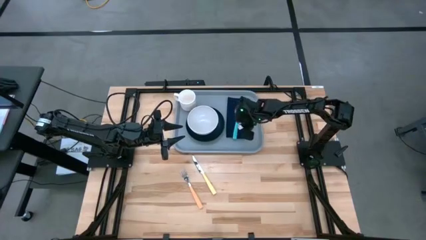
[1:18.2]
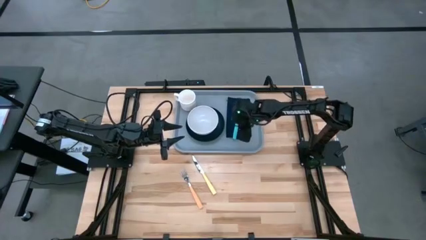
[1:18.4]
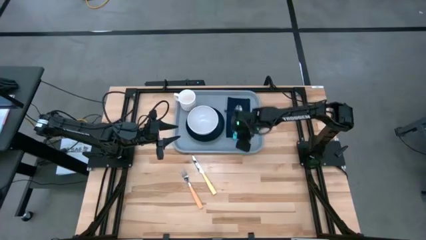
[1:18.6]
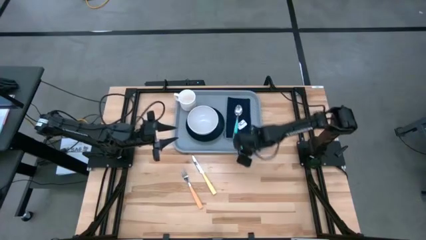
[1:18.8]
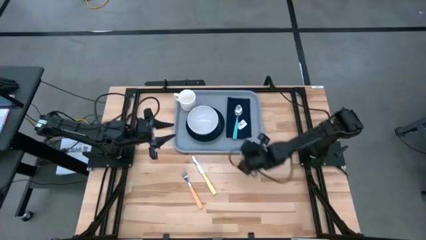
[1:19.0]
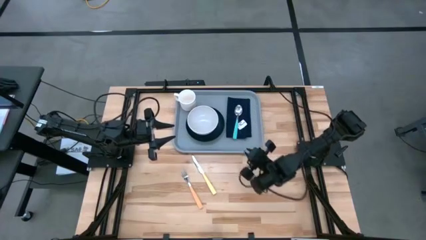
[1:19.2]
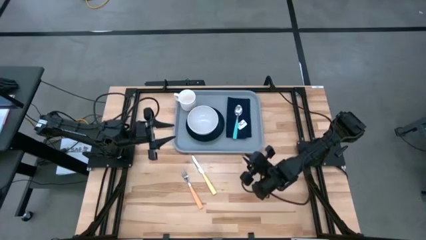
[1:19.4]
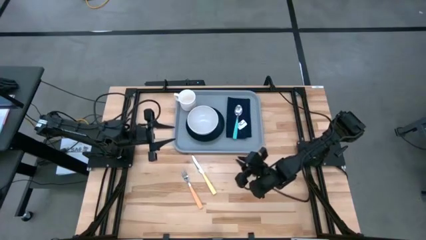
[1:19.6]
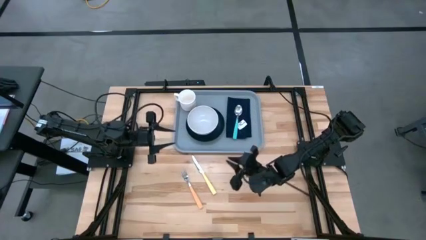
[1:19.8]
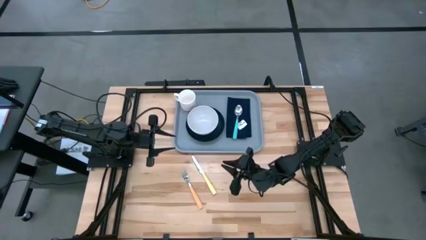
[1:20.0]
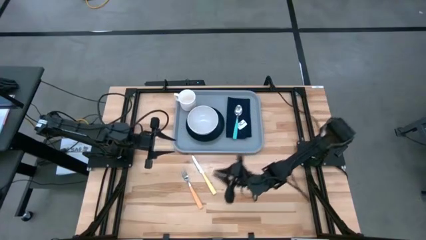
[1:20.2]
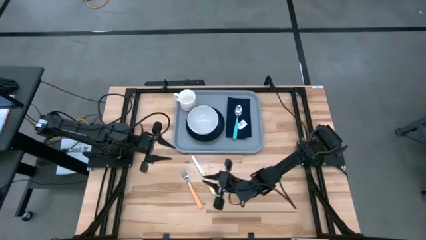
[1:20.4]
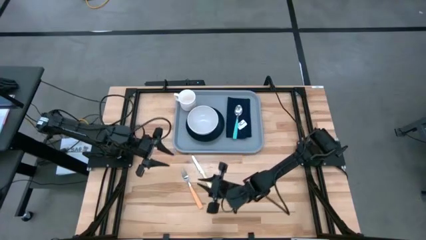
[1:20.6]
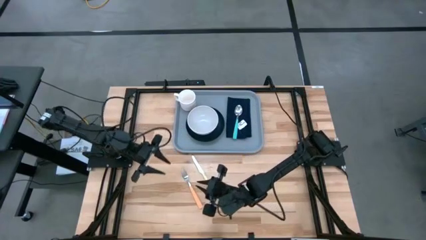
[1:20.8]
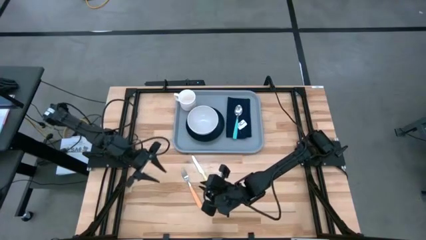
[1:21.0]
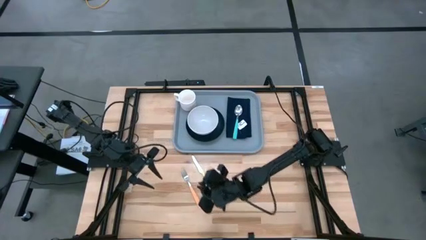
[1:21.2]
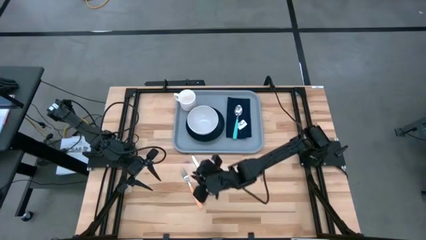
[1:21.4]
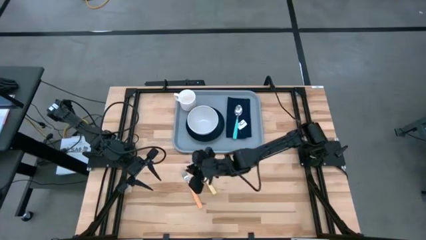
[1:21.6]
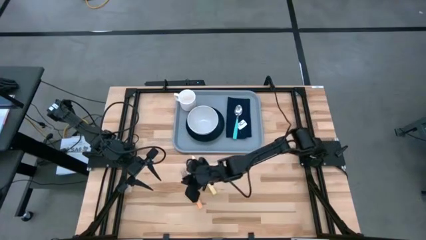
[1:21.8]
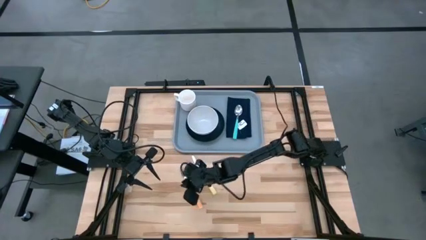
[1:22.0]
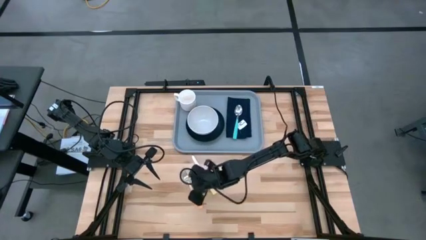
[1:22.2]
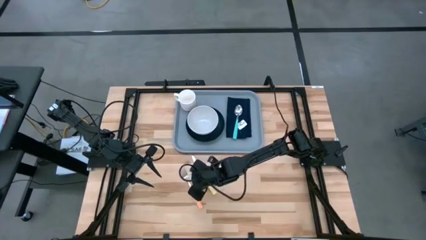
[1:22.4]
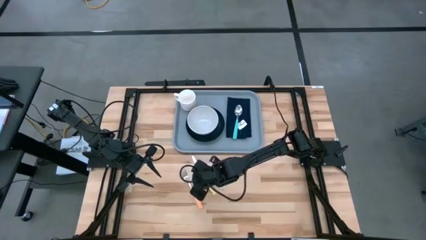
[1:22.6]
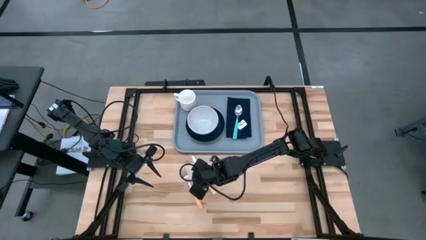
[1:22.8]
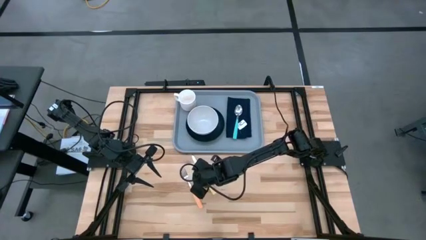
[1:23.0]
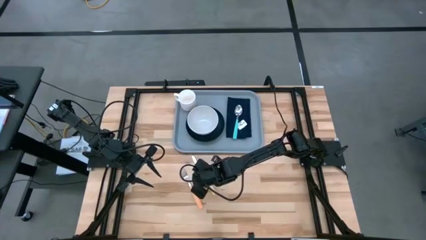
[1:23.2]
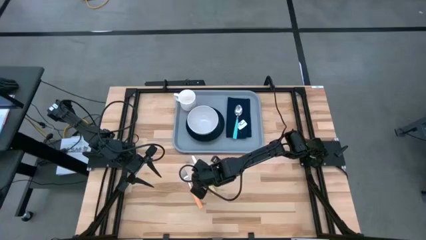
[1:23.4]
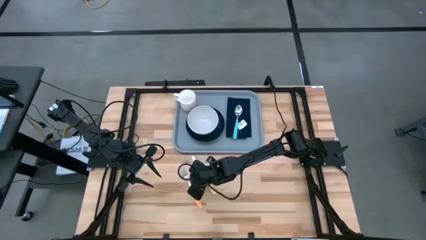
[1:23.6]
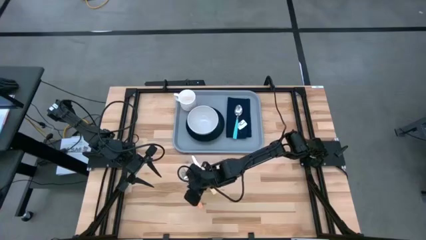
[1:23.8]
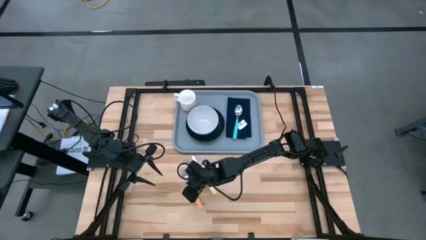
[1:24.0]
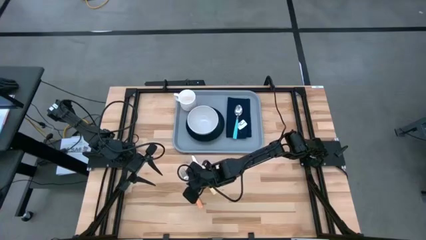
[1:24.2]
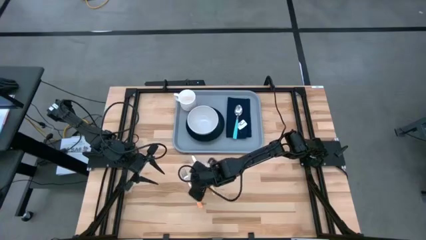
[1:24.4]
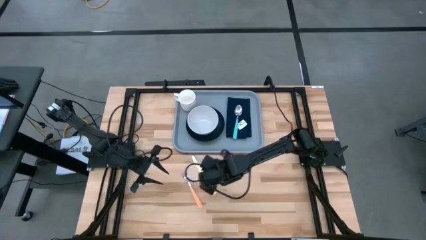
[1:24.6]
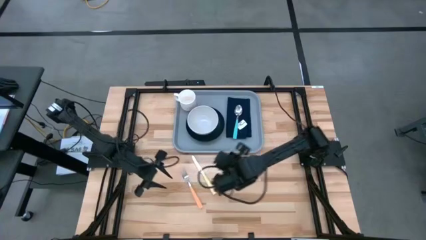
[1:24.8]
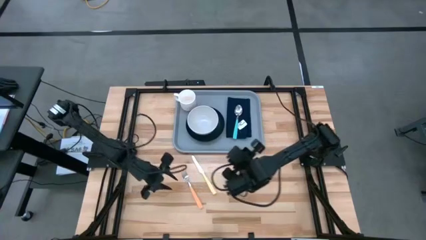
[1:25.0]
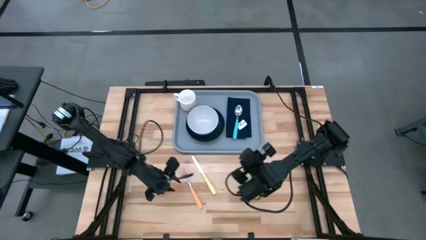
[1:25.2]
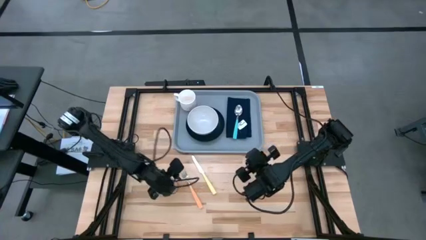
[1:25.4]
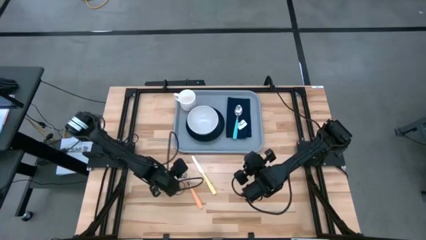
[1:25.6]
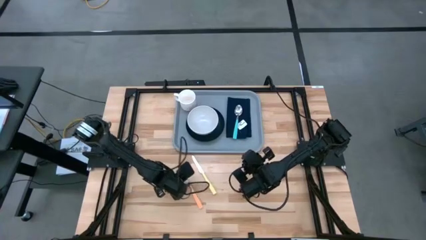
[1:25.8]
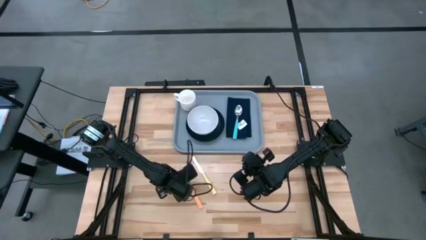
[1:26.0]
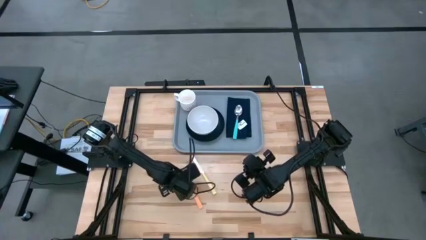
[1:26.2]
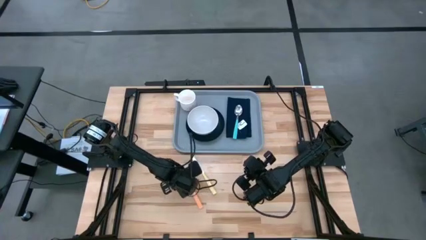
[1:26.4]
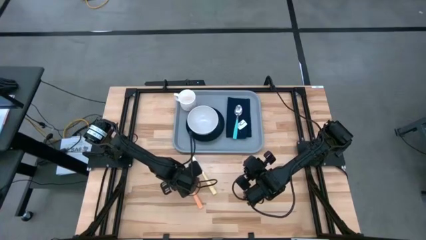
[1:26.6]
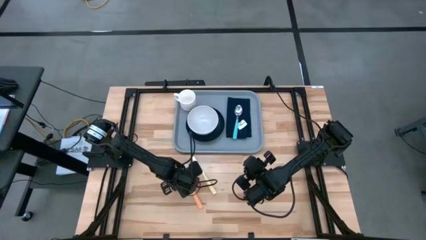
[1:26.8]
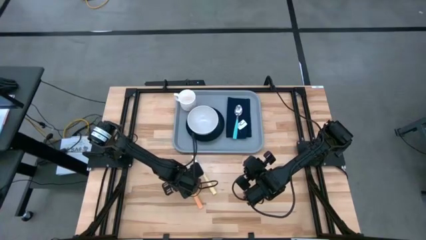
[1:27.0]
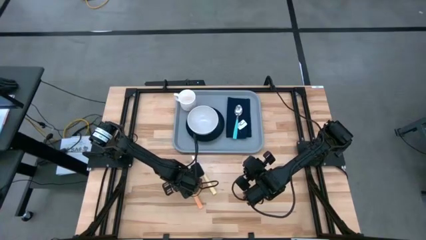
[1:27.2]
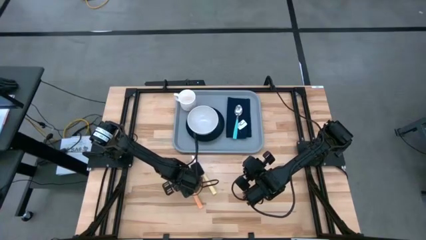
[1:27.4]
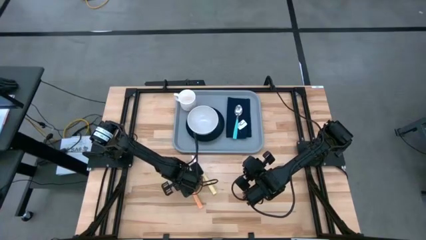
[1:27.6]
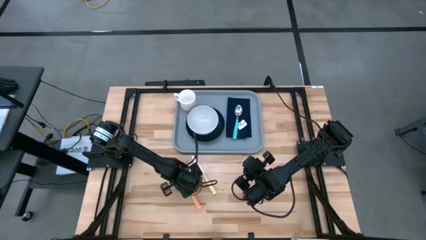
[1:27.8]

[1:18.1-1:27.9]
Task: Set up tray
Put the orange fork to the left of the blue spoon on the black napkin

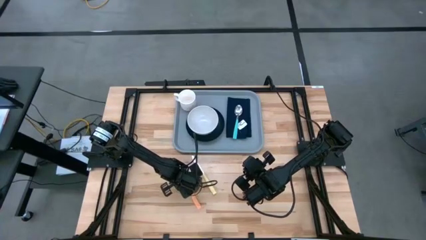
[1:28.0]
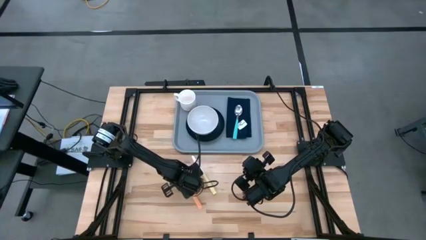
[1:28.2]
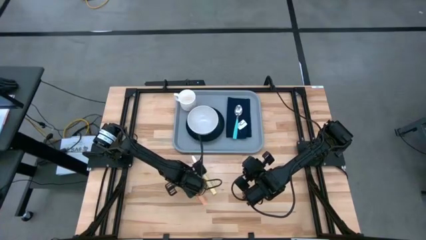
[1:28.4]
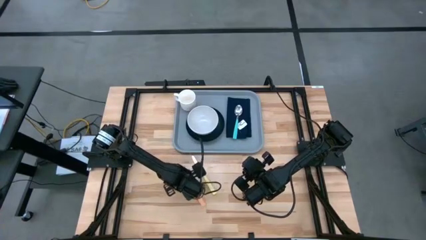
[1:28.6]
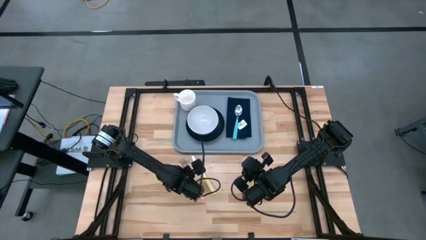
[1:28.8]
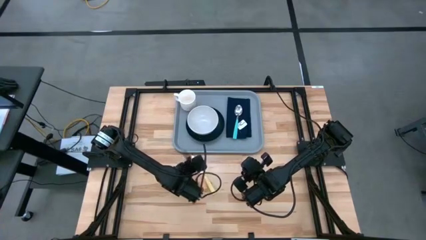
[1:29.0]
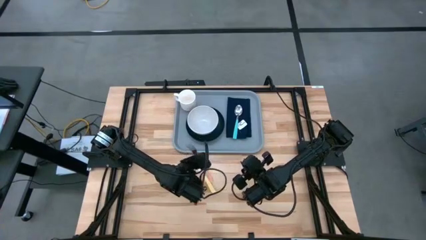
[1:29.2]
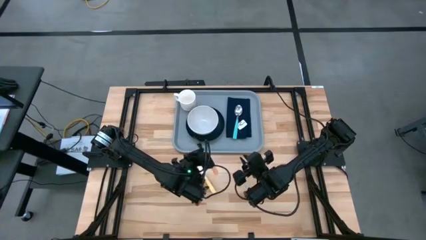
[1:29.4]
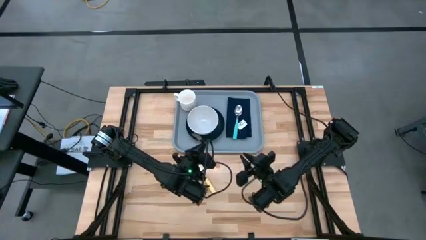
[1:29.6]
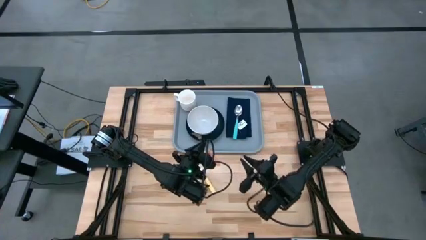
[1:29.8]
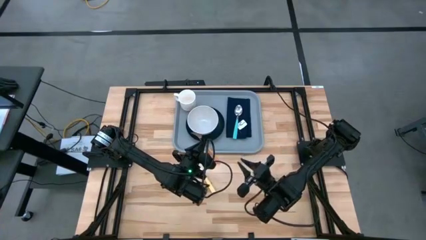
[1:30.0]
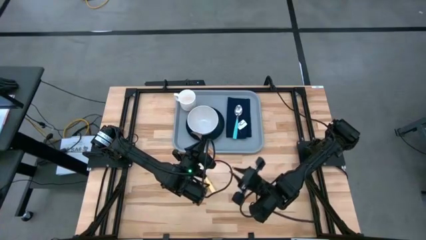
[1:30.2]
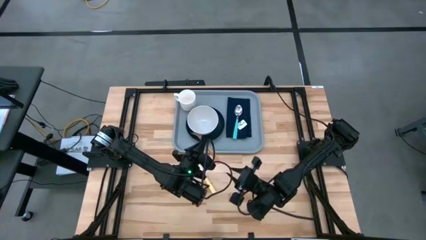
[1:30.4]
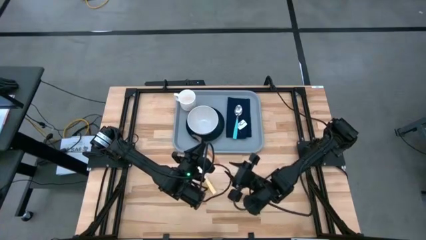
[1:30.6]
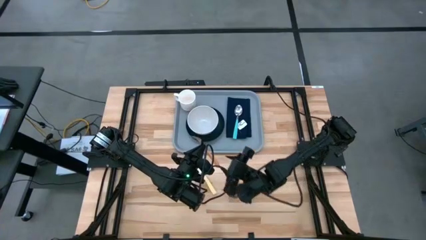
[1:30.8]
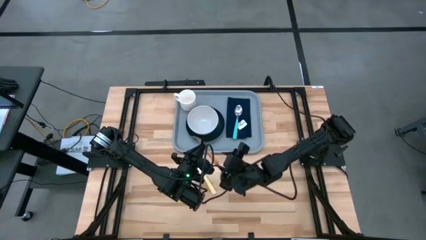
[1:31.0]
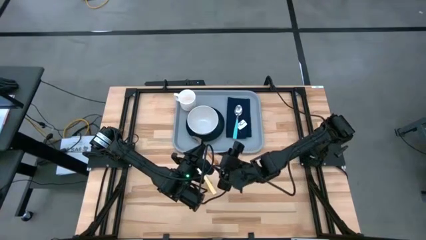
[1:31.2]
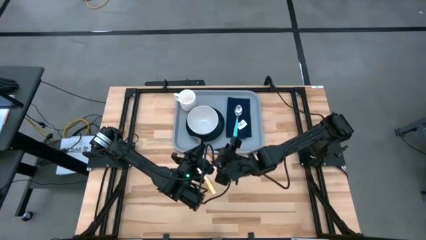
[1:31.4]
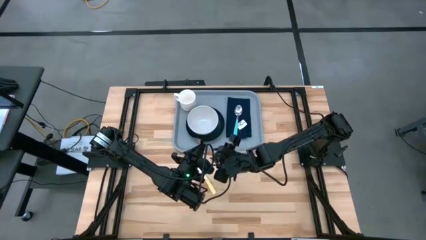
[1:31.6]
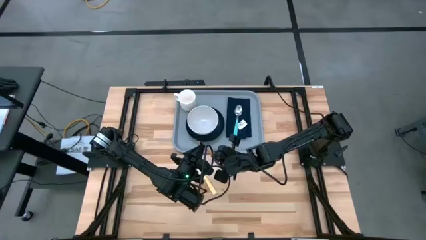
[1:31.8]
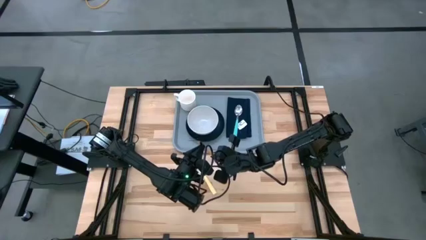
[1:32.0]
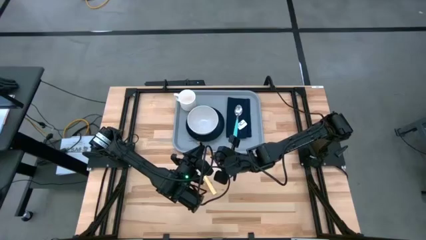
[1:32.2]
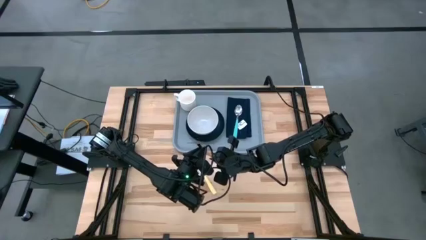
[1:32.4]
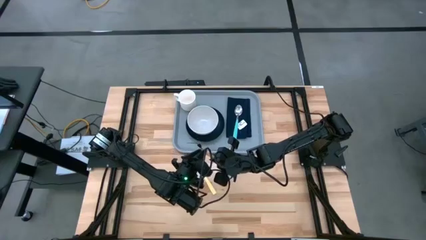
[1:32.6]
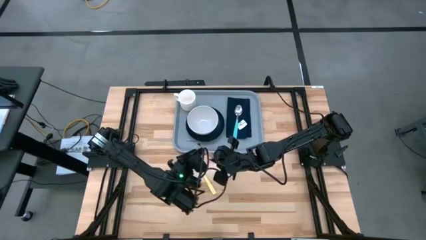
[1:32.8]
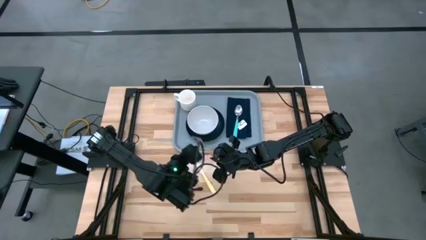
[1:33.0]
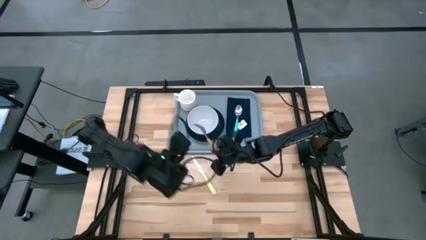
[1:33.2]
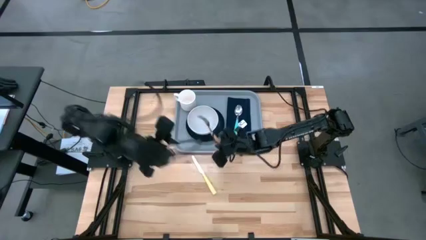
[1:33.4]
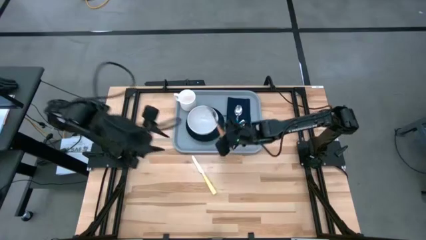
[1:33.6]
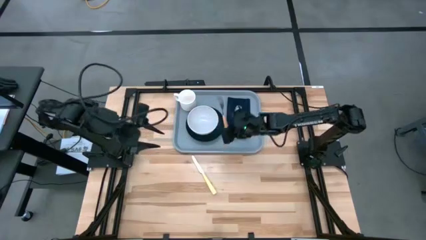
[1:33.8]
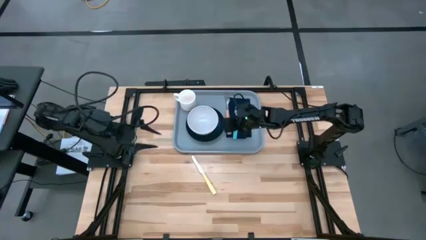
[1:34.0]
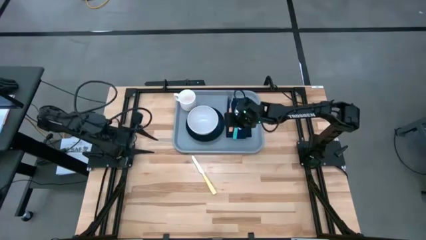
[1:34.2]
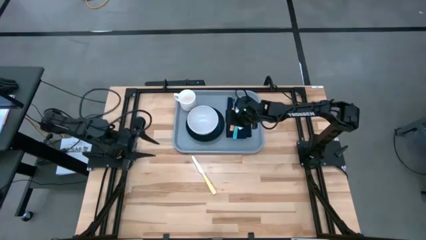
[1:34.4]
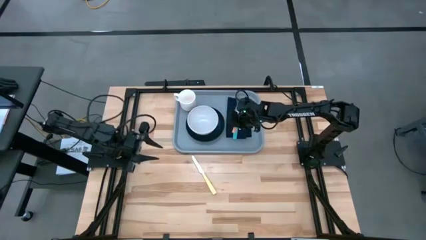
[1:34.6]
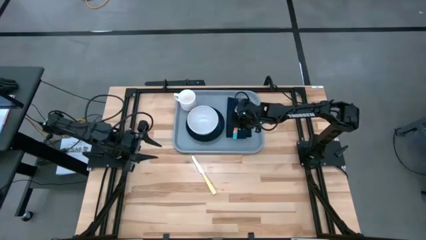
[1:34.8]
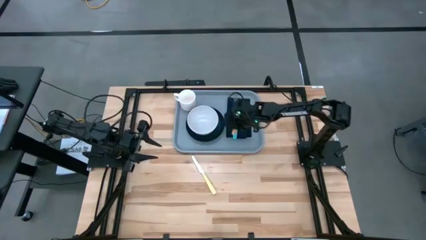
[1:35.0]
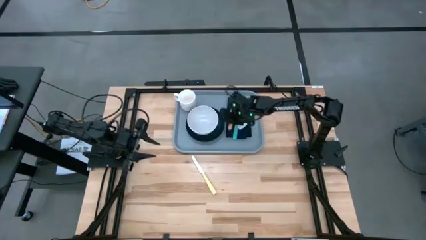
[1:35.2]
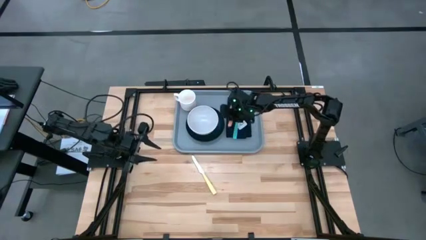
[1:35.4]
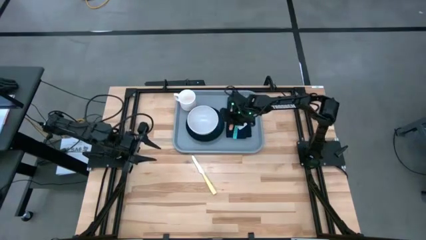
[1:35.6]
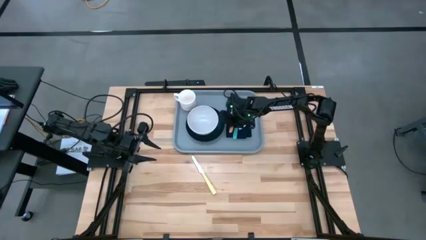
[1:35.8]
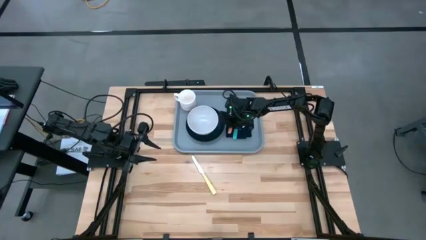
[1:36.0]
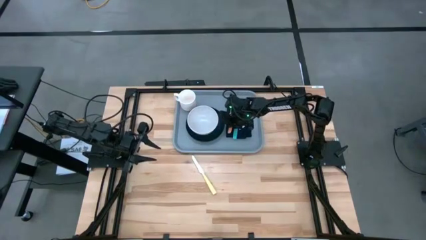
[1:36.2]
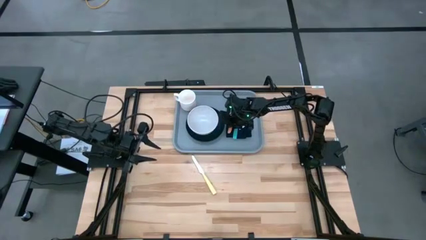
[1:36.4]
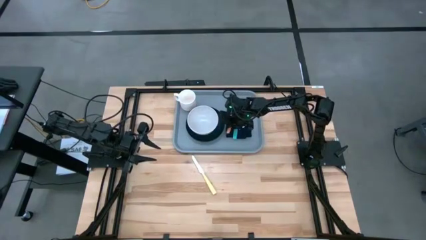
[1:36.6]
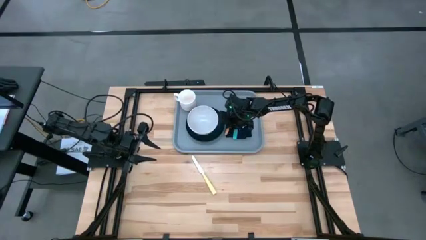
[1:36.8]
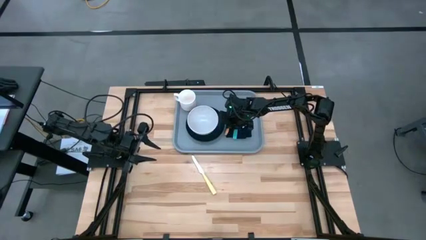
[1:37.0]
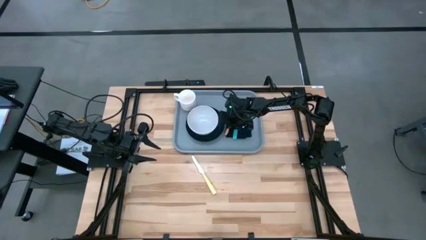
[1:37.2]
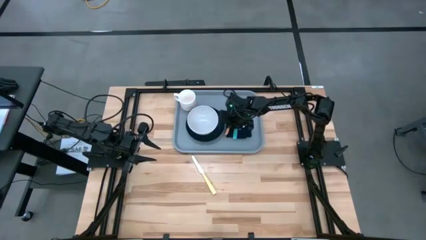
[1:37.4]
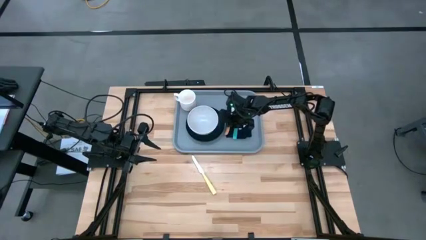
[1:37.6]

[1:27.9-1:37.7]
Put the orange fork to the left of the blue spoon on the black napkin
